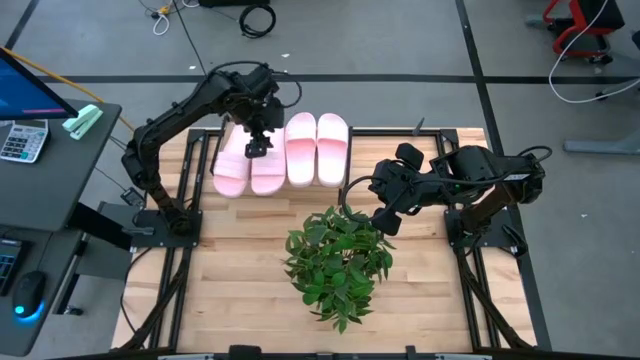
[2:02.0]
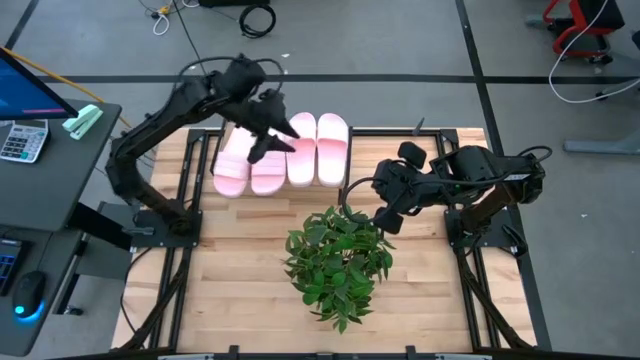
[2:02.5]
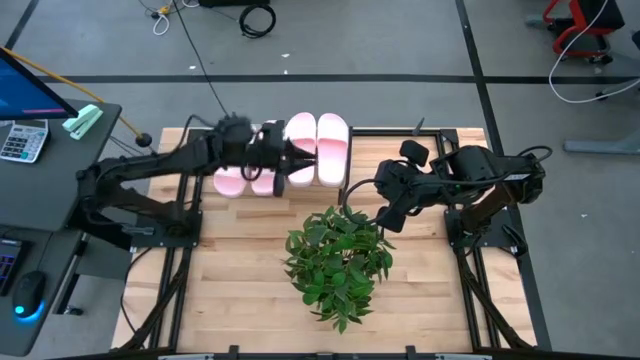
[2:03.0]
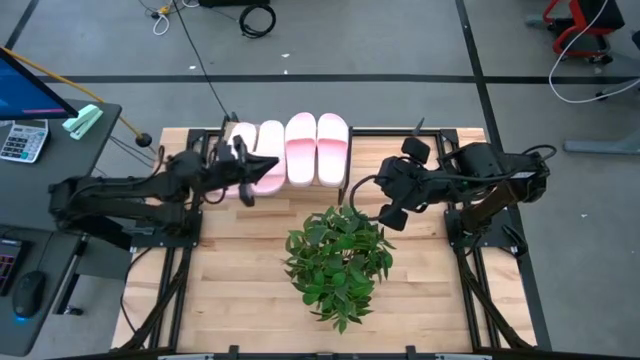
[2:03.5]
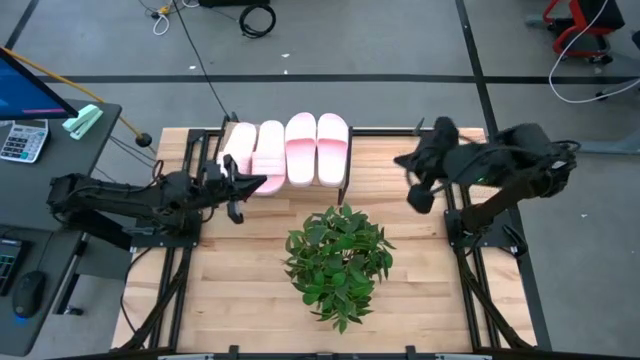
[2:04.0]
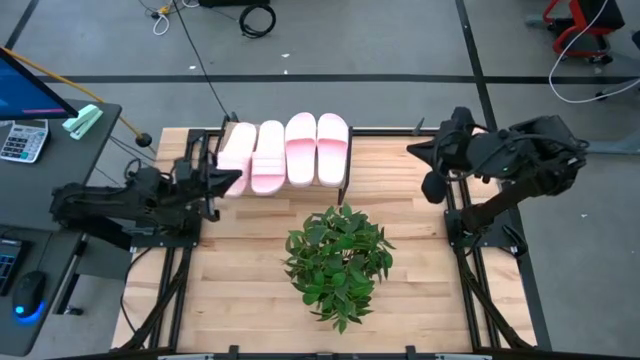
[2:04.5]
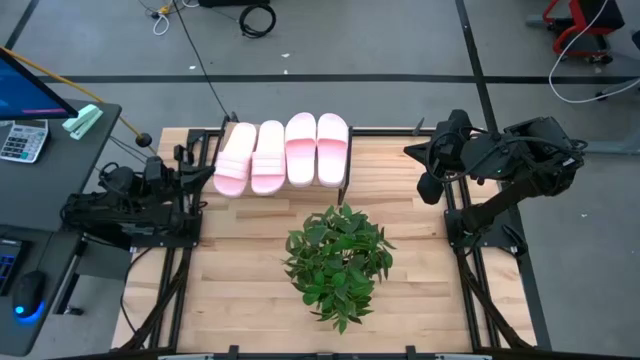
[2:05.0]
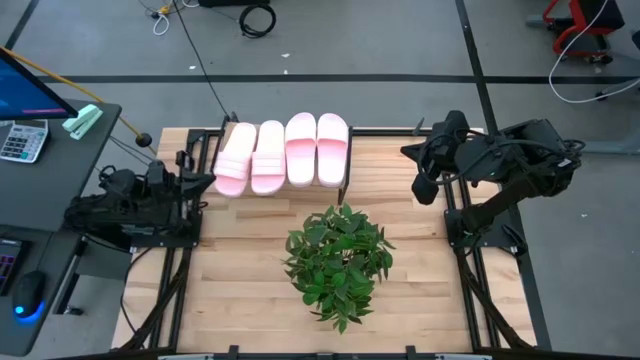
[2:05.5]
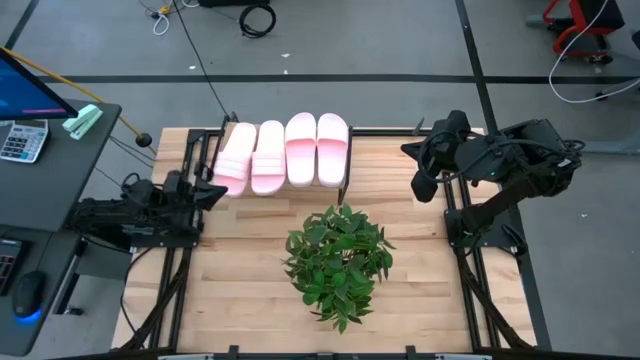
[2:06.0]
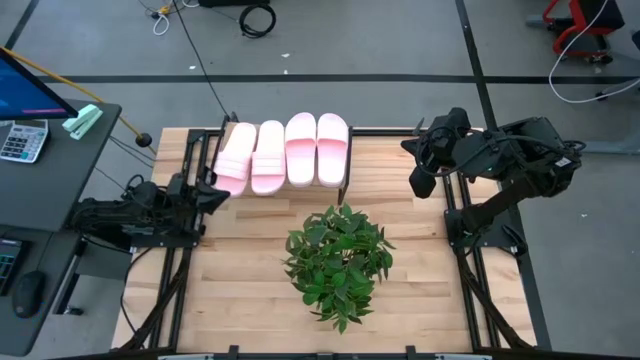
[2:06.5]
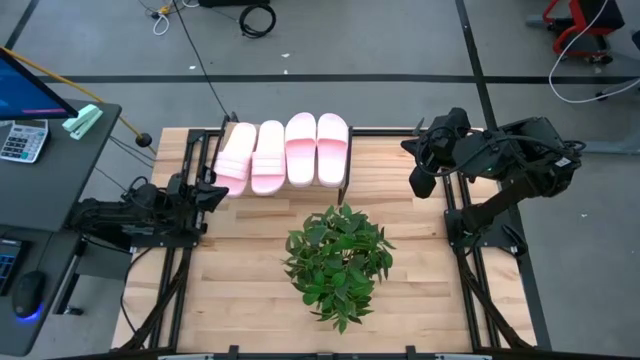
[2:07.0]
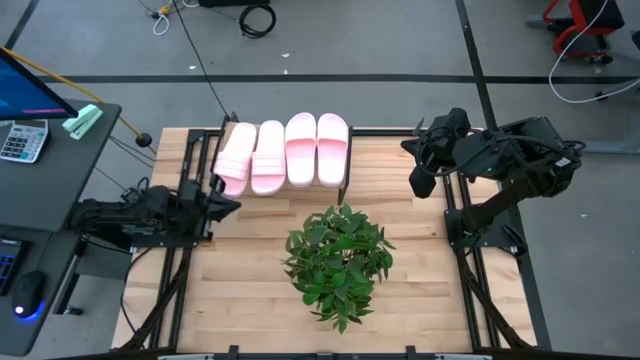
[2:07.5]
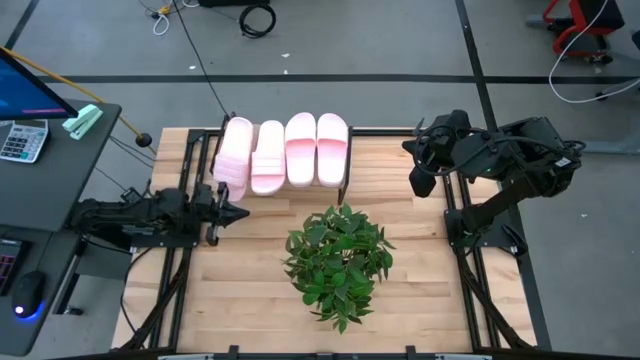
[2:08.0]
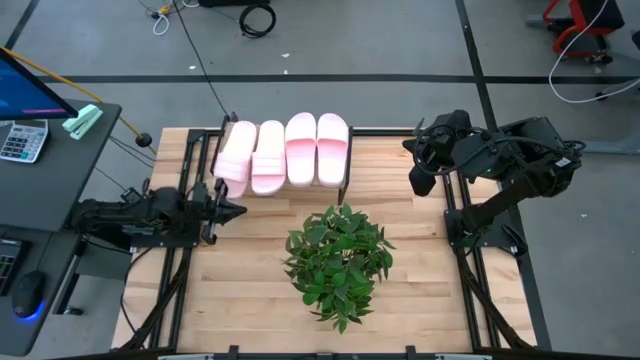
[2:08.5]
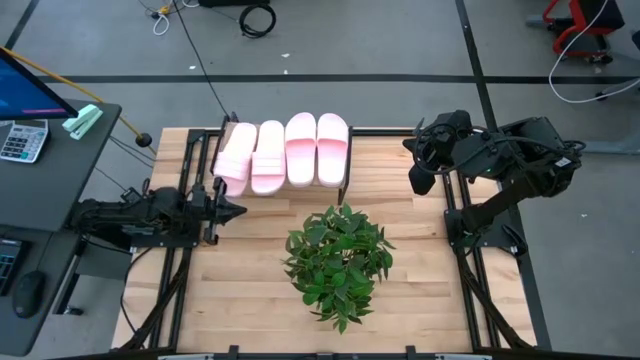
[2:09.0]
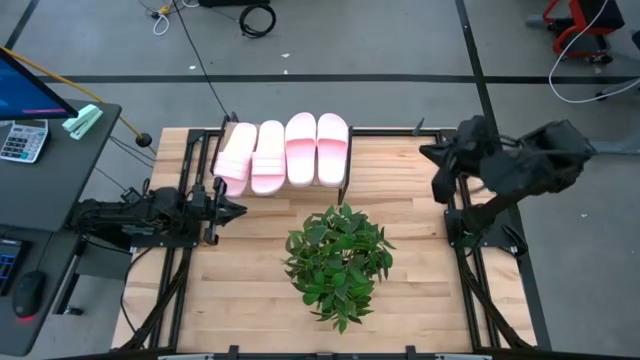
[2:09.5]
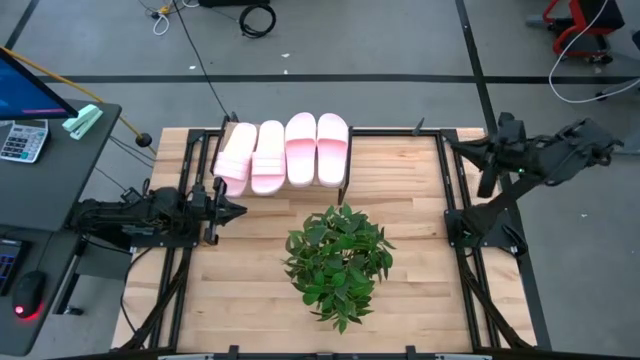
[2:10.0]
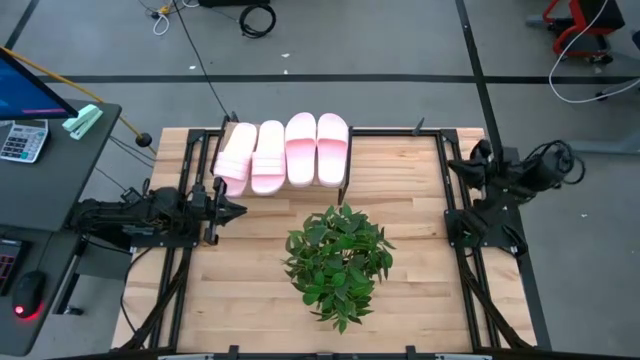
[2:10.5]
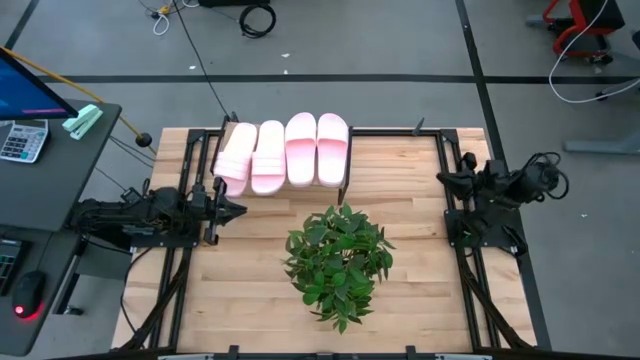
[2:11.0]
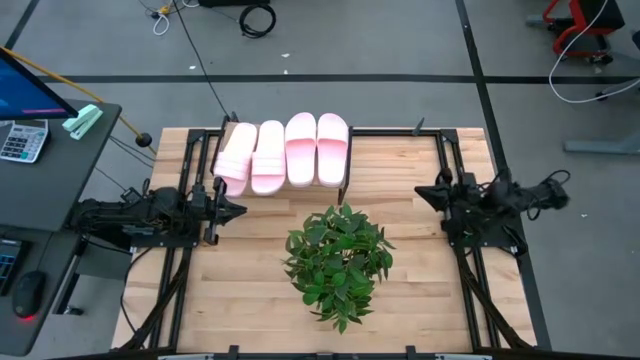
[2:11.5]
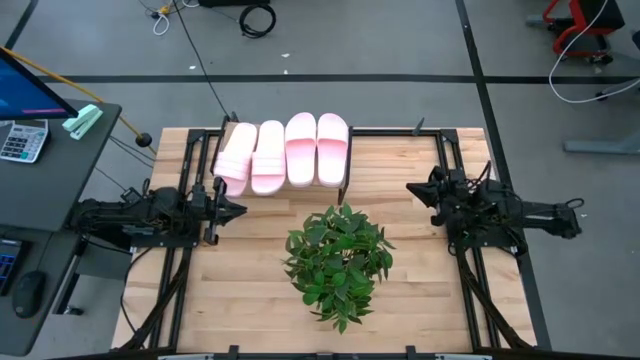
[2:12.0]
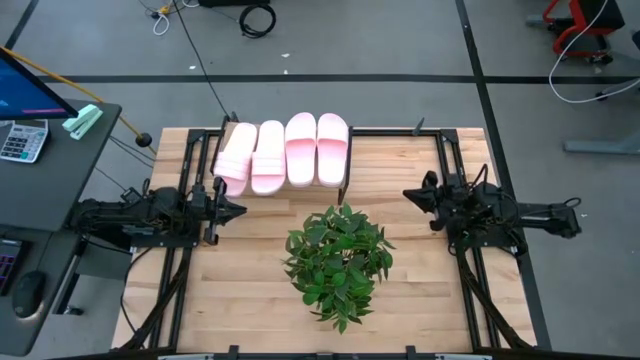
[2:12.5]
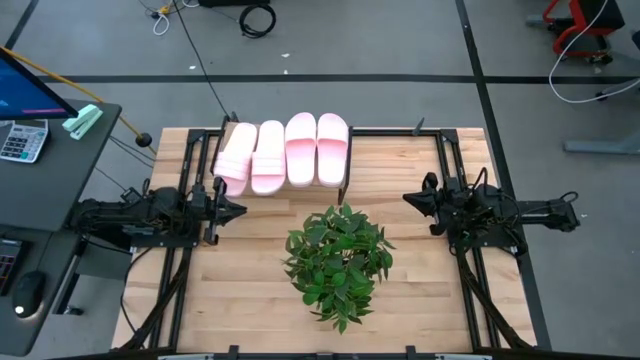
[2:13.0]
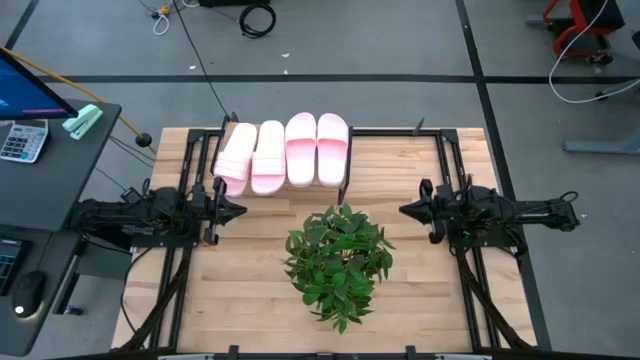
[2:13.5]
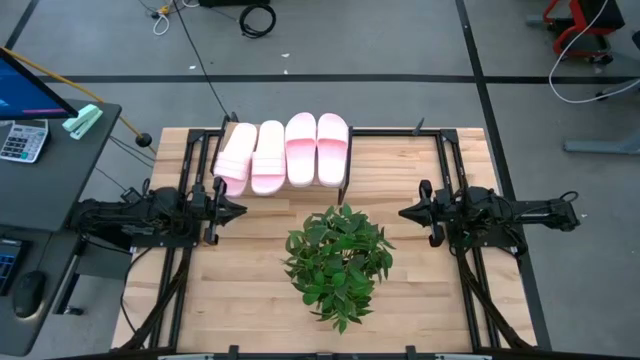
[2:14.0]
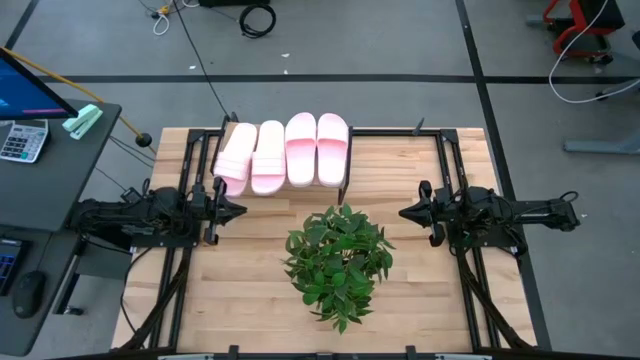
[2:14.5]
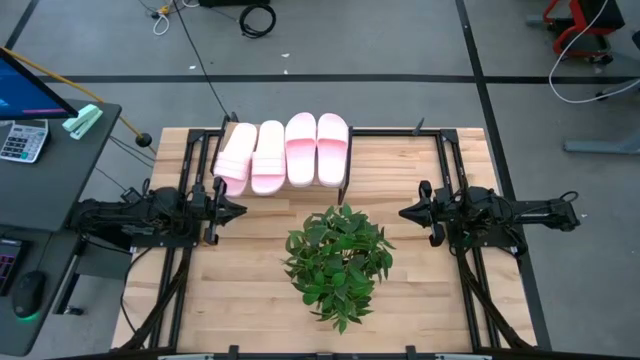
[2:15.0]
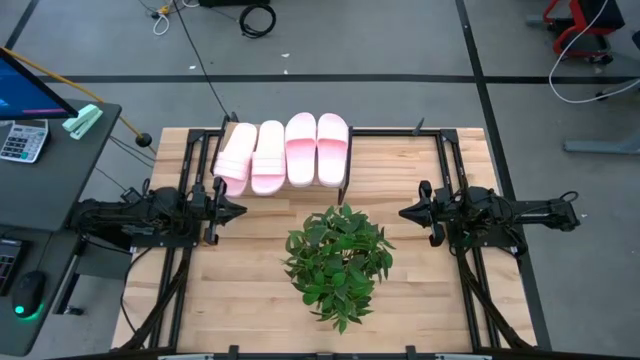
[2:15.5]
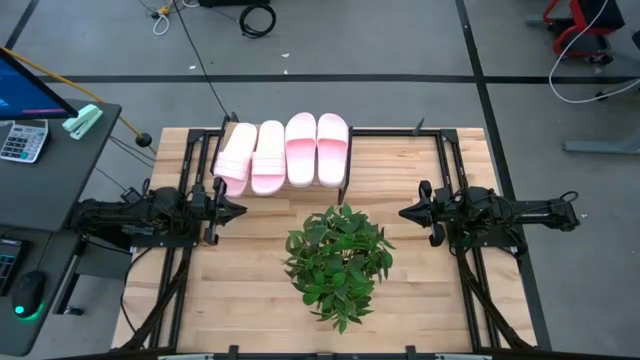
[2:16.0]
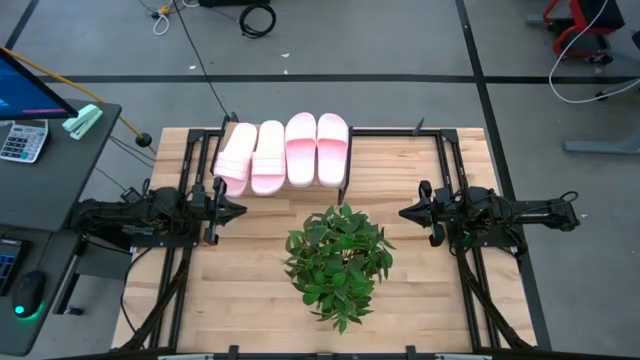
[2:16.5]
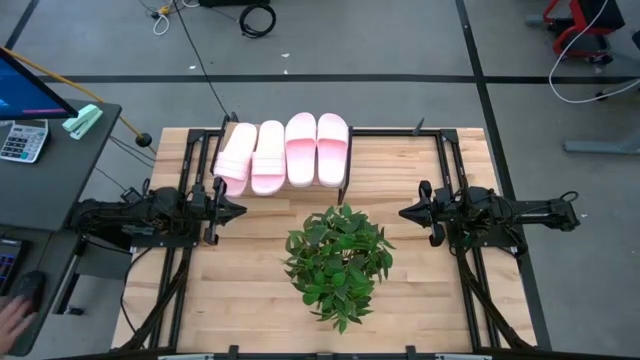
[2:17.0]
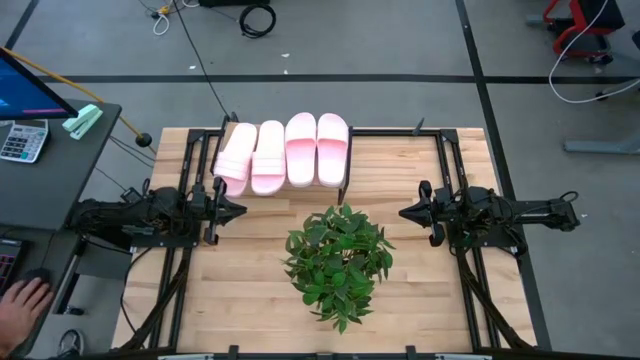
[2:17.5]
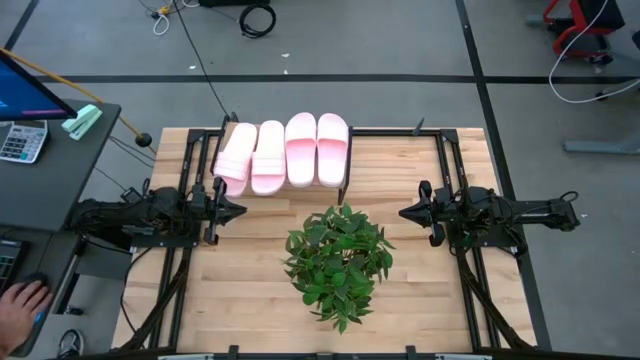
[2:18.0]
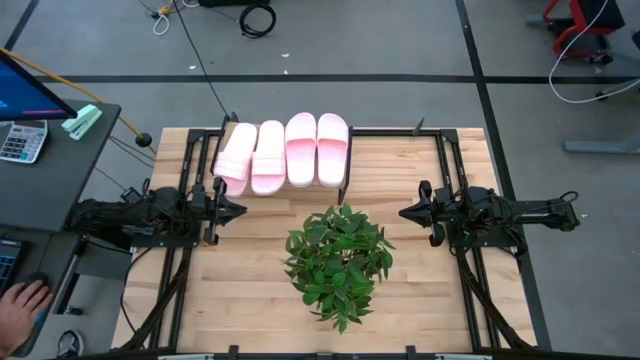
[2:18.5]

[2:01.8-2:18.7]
Task: Pick and place slides into the shelf
Return to Home Position

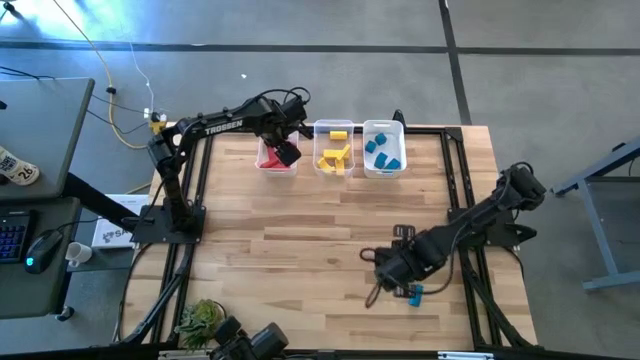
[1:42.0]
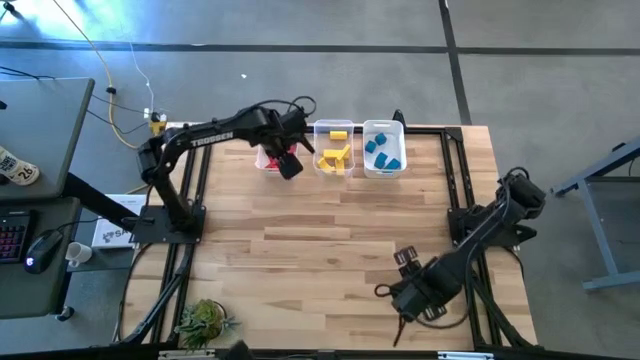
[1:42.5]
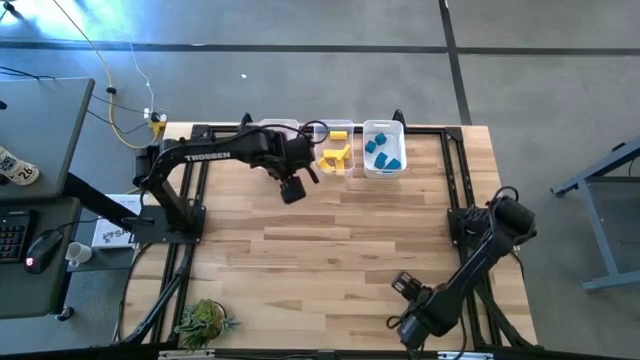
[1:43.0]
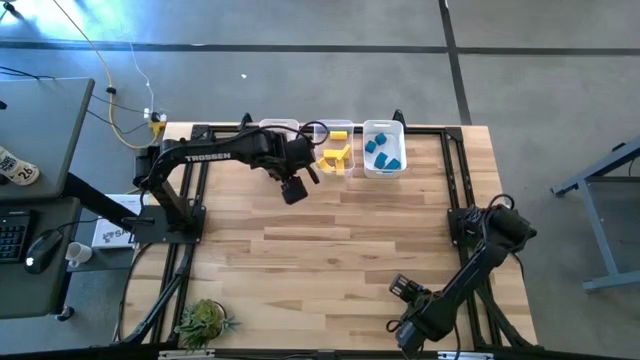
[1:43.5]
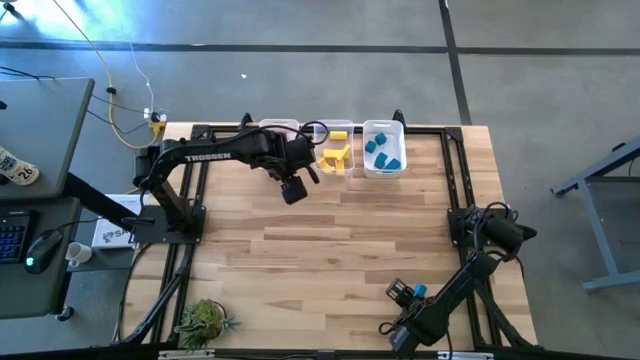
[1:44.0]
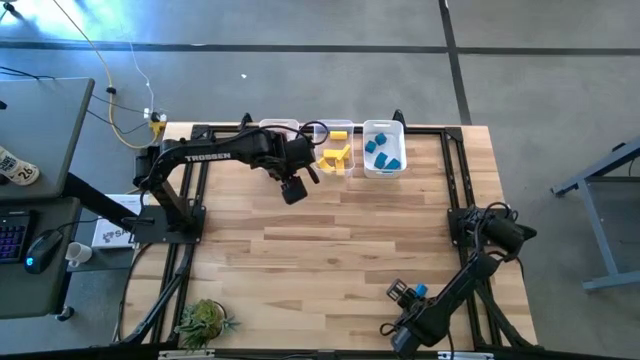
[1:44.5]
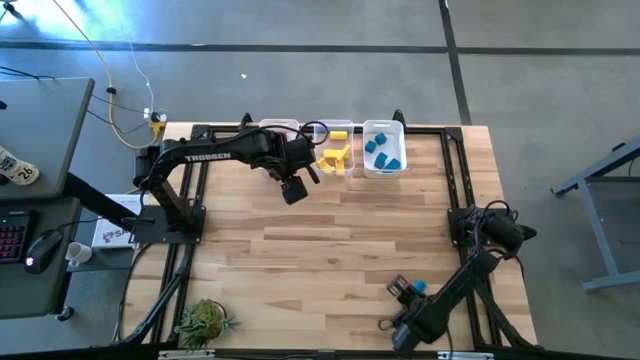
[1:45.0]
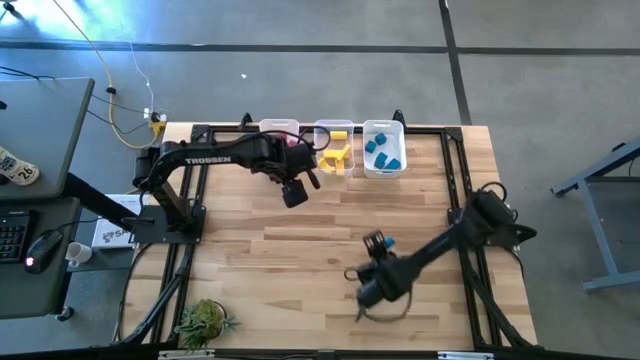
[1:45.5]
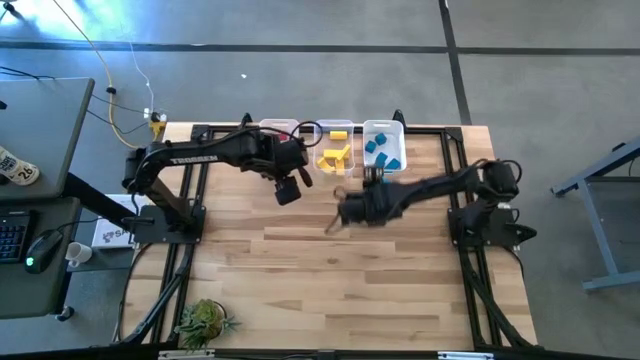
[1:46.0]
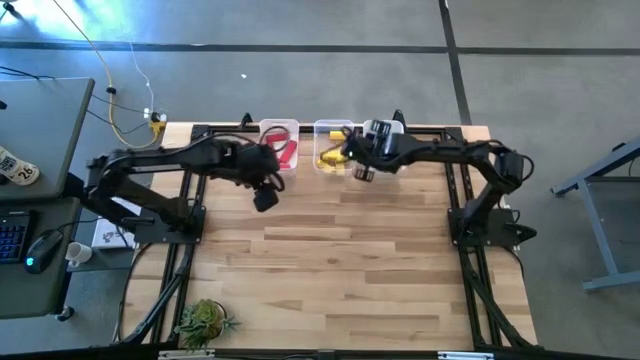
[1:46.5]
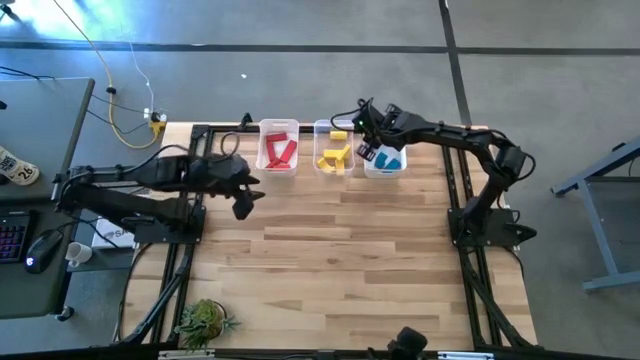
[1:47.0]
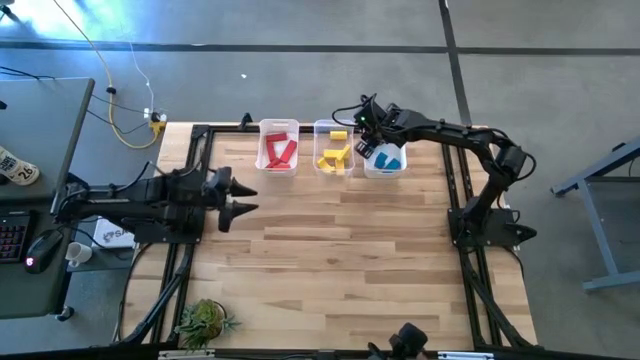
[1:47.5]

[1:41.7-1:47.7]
Task: Sort & place blocks by color
Put the blue block into the right white bin
